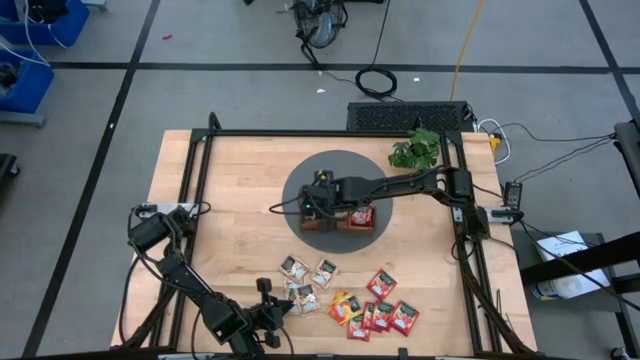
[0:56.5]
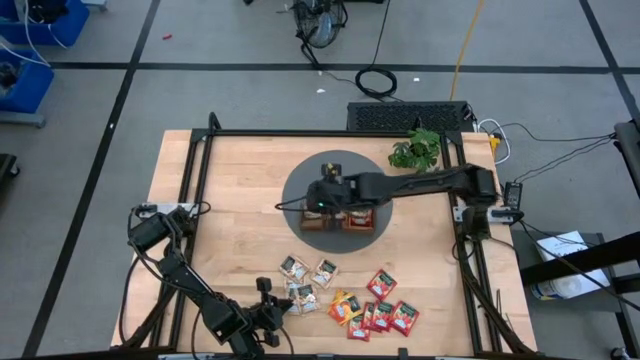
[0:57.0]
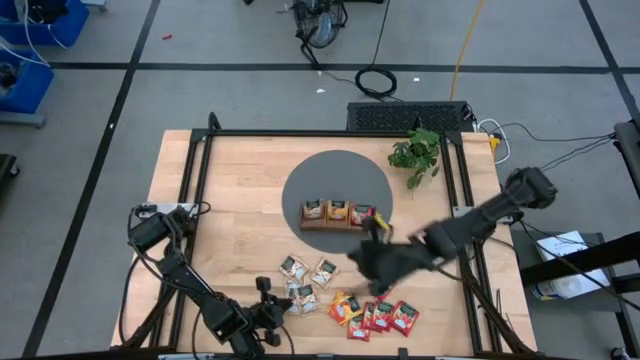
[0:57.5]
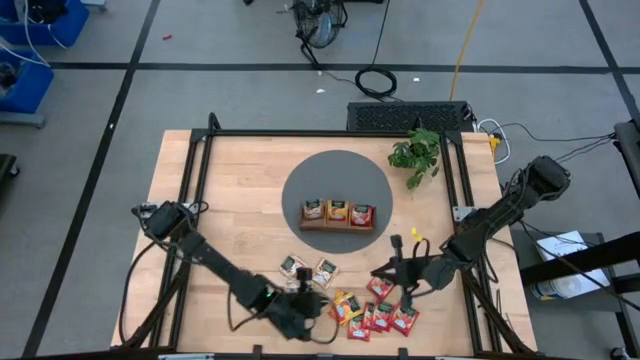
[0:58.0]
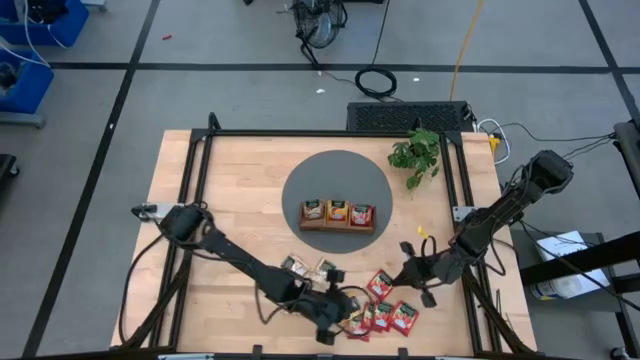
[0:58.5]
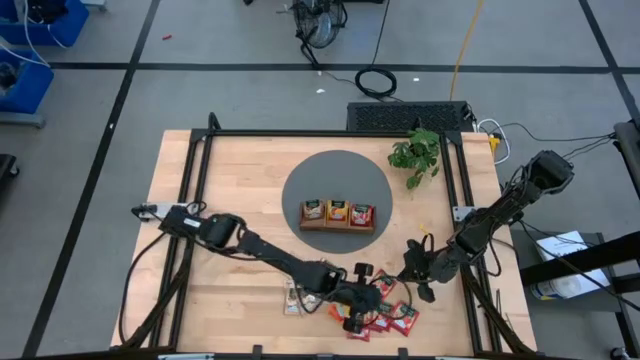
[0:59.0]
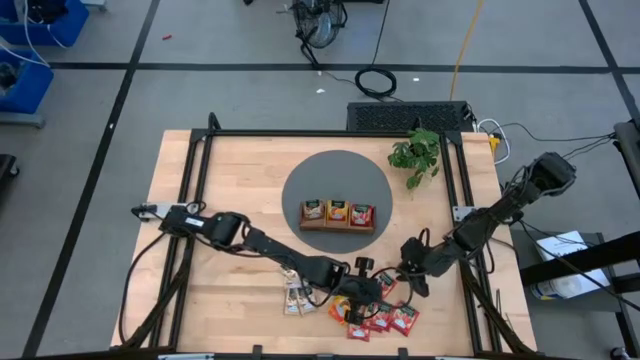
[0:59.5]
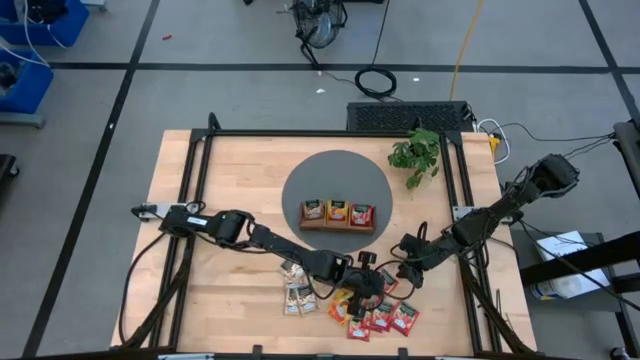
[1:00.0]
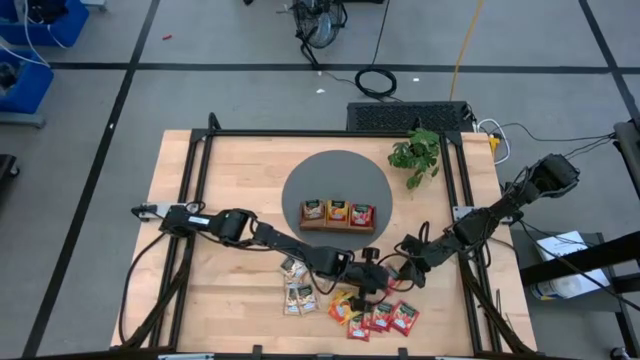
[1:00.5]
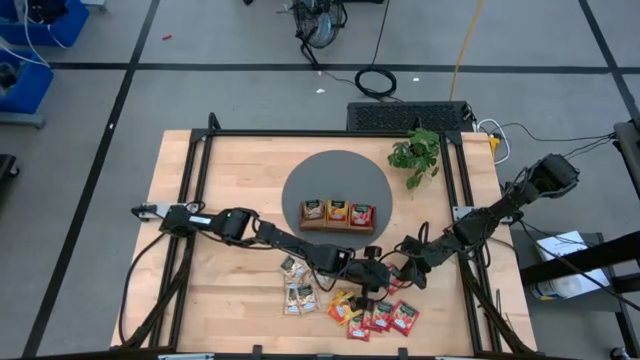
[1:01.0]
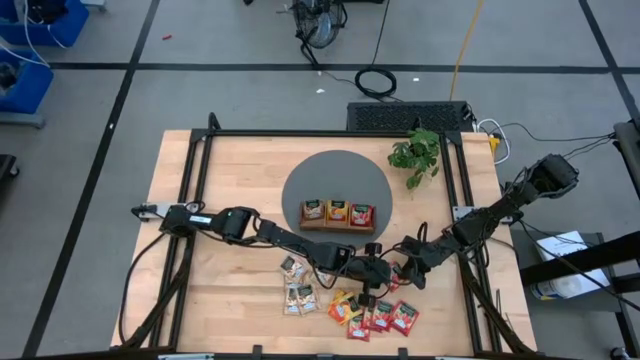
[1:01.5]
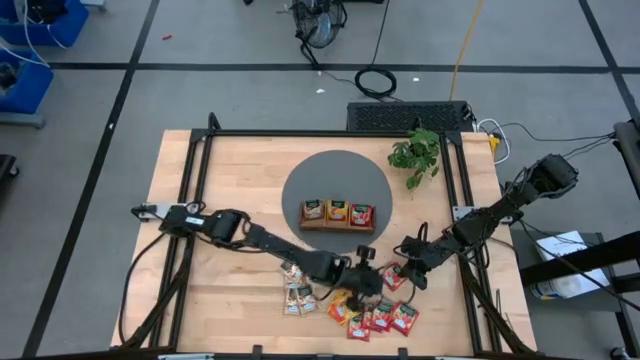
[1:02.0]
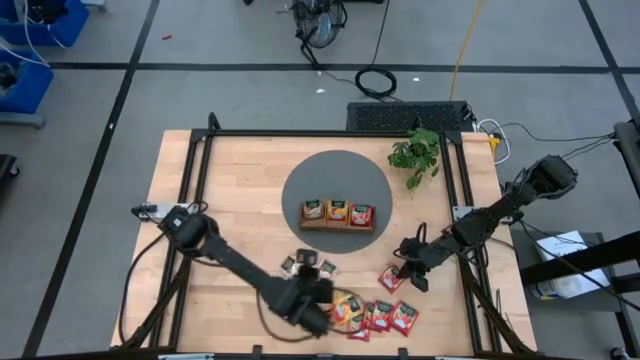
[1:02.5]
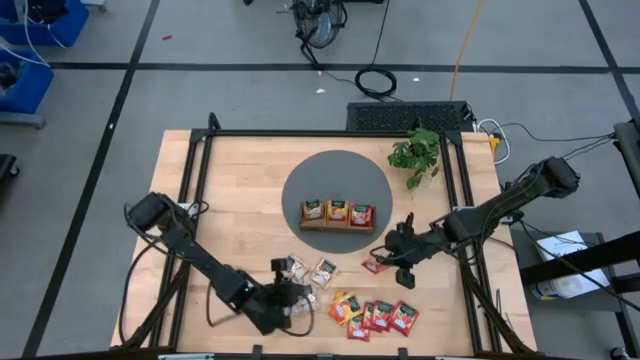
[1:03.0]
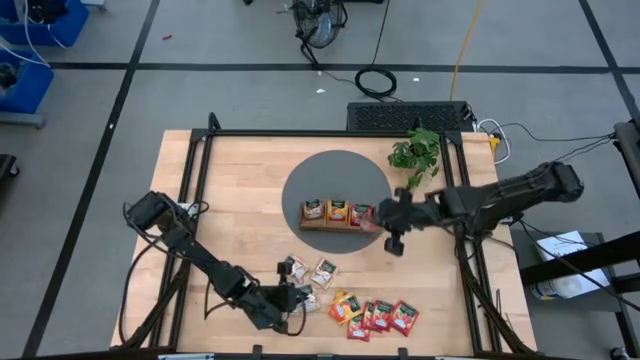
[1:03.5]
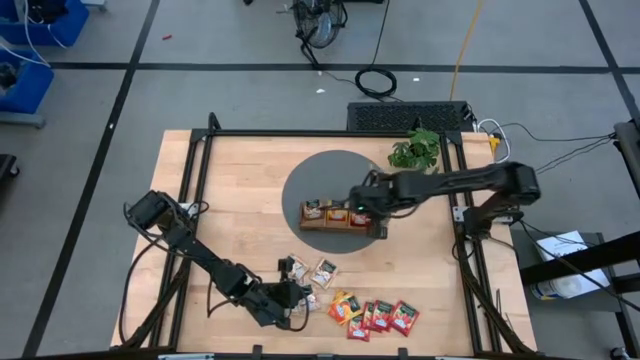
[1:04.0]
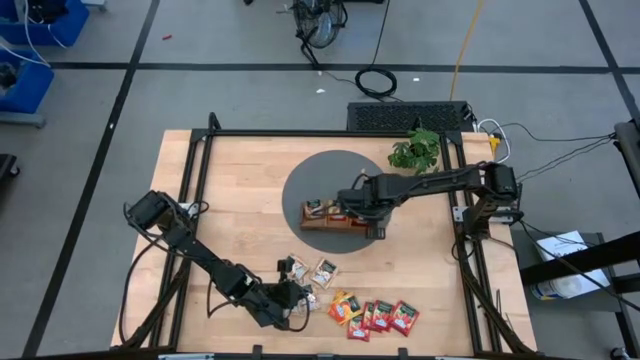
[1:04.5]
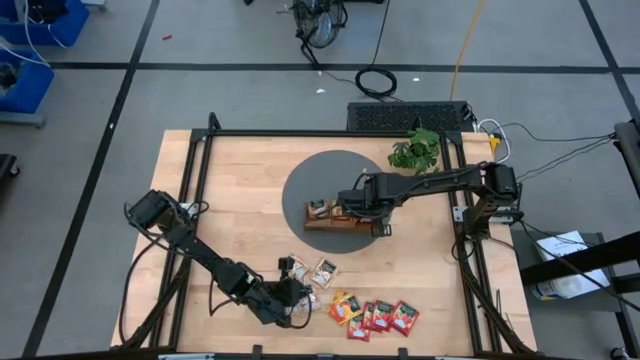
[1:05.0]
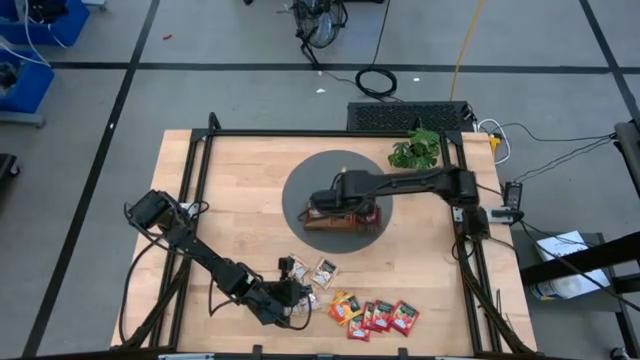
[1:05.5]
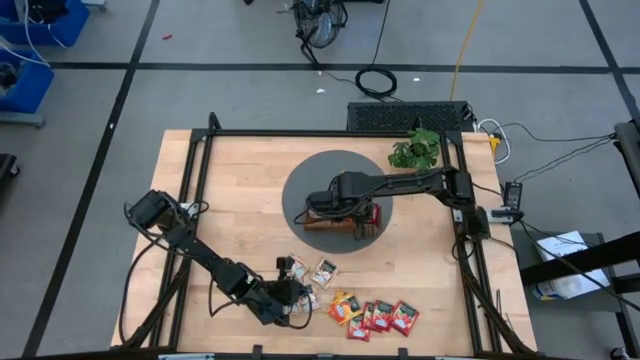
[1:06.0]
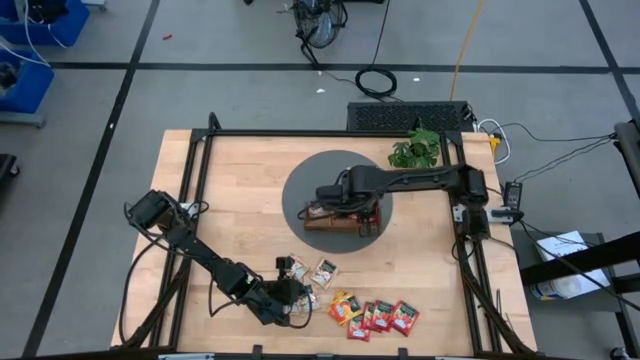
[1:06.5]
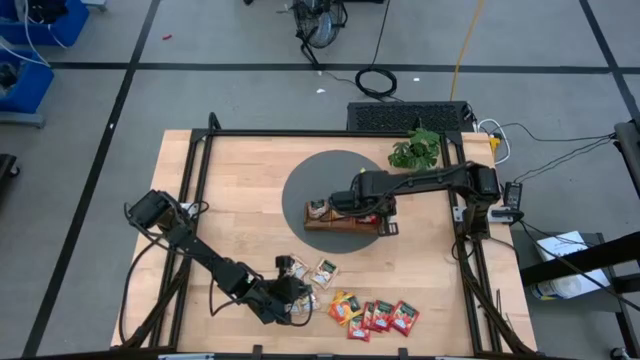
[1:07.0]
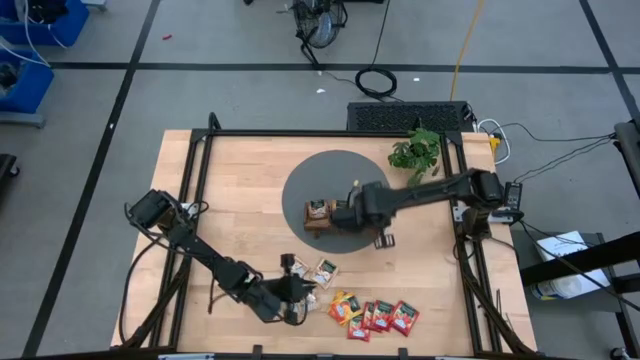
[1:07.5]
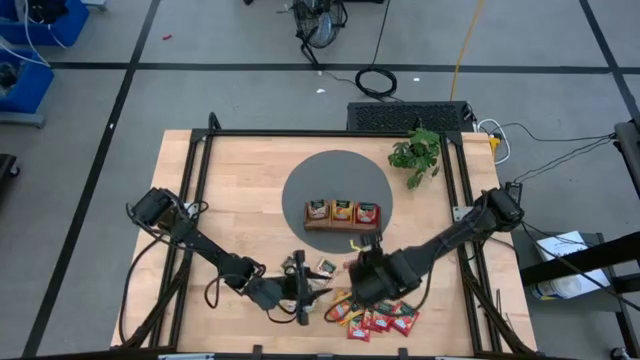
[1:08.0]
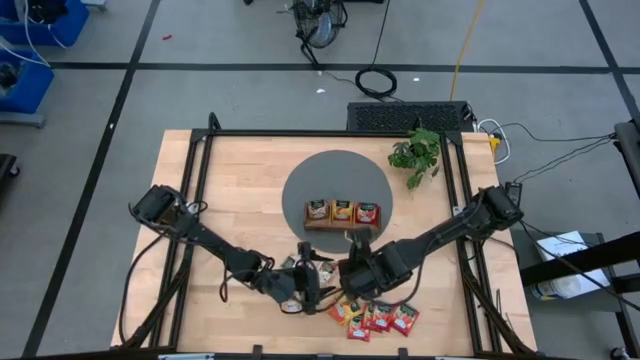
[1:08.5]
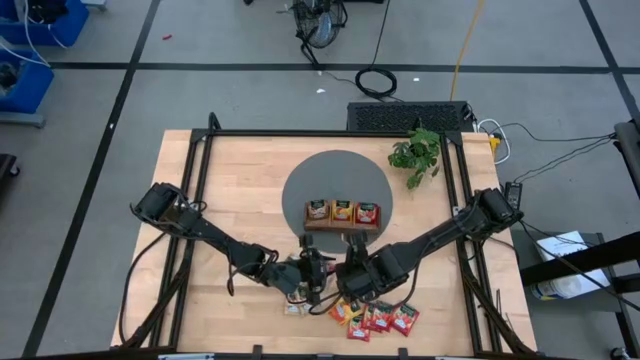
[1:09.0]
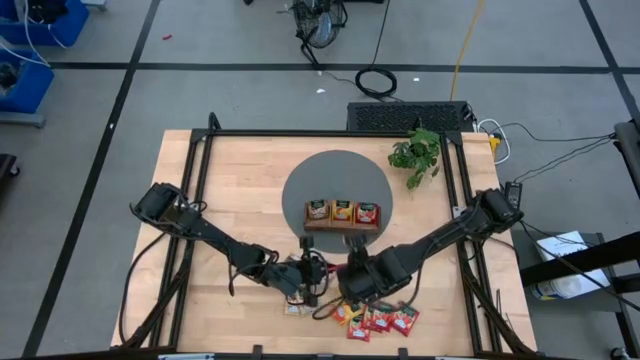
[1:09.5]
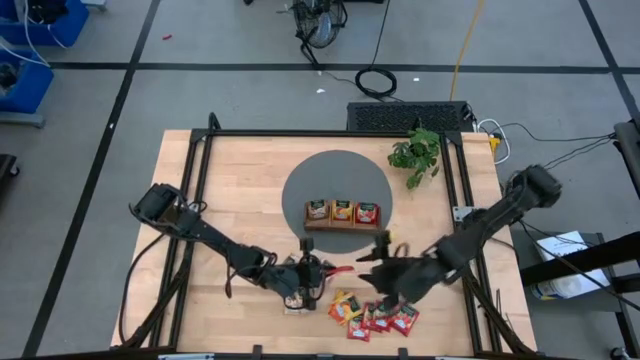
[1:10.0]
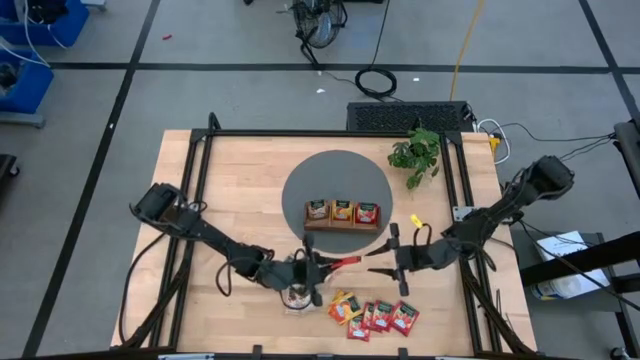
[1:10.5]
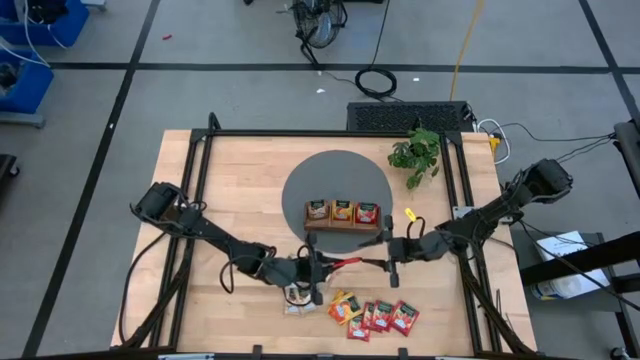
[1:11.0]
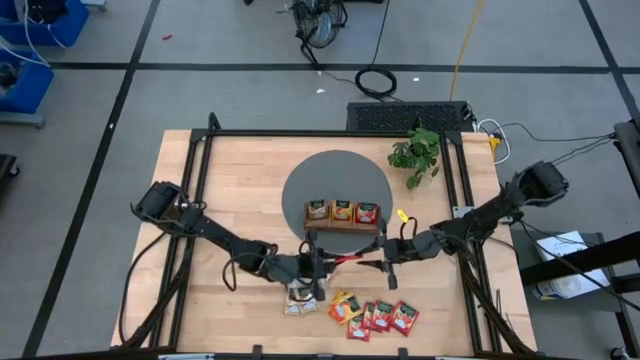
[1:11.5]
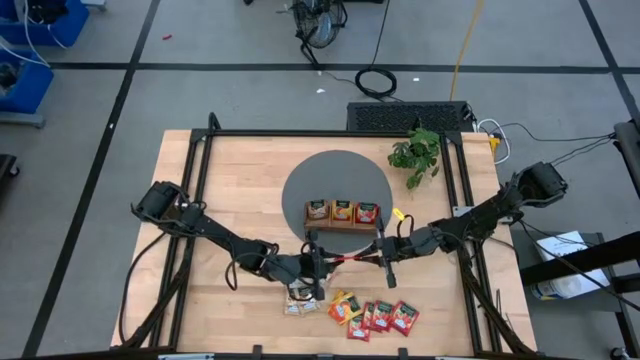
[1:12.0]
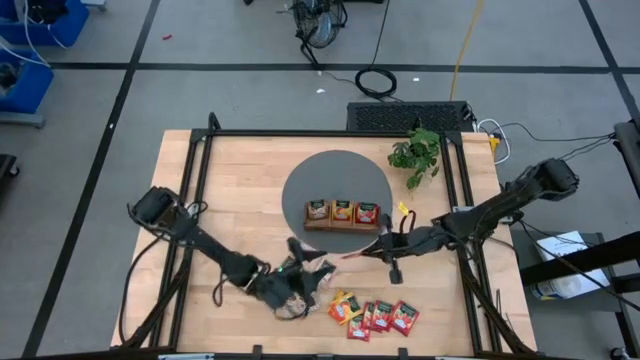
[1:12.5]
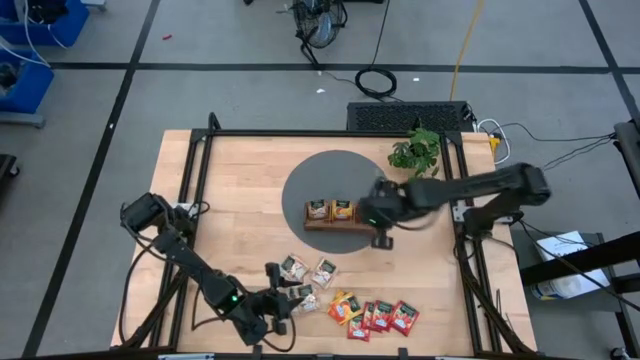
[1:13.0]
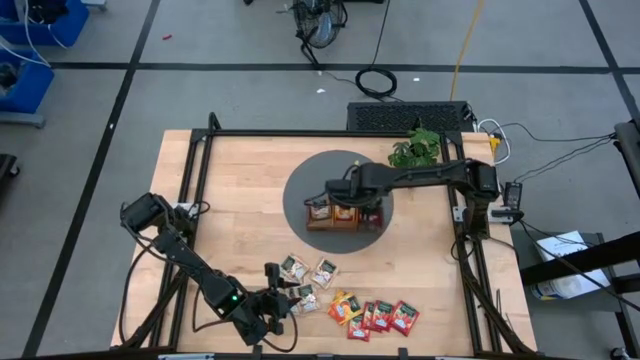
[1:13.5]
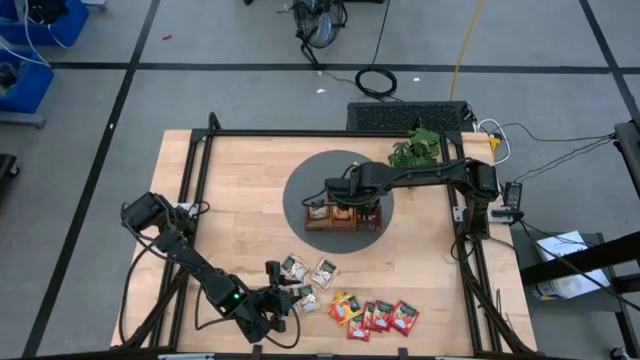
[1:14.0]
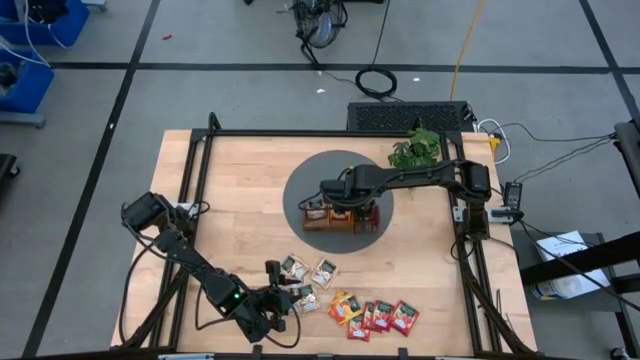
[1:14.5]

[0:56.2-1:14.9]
Task: Pick & Place Tea
Put the red tea bag into the right slot of the wooden organizer

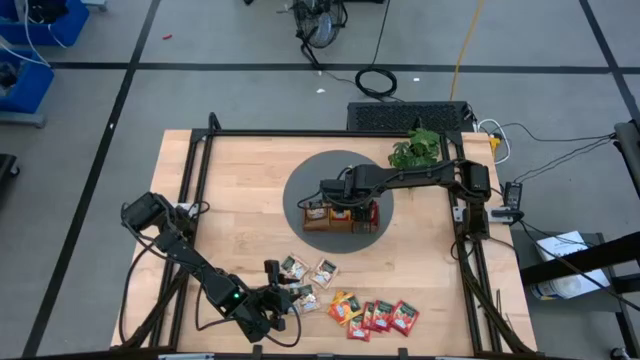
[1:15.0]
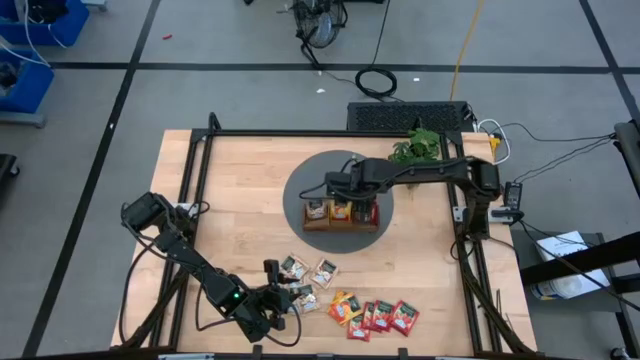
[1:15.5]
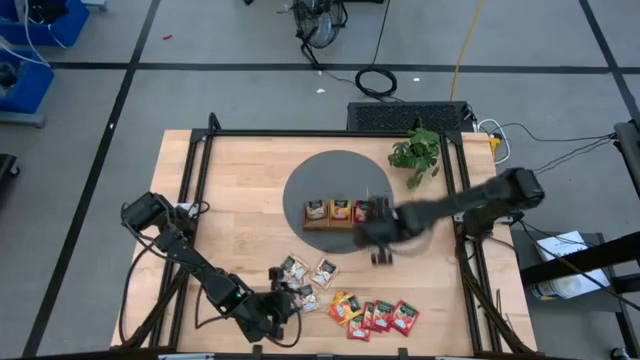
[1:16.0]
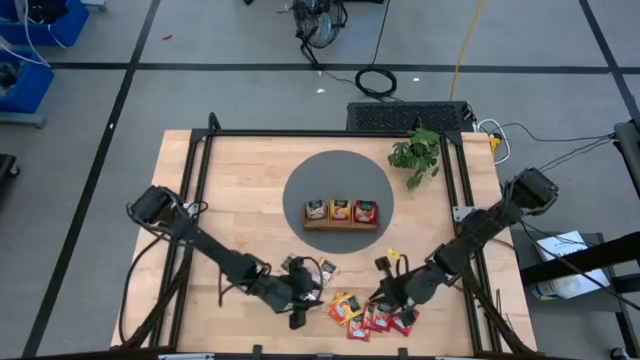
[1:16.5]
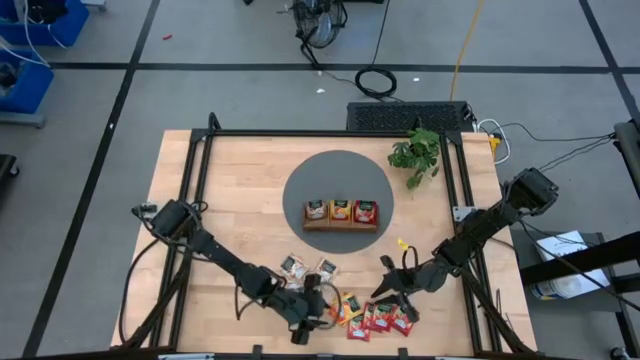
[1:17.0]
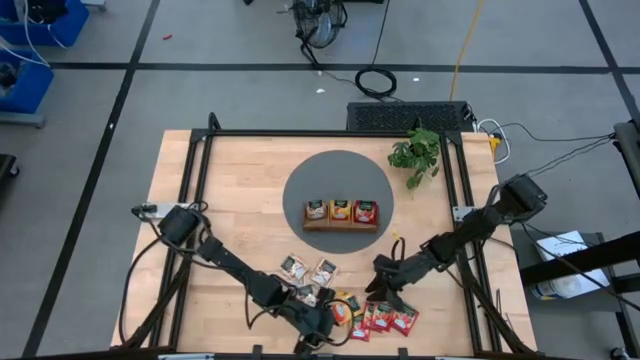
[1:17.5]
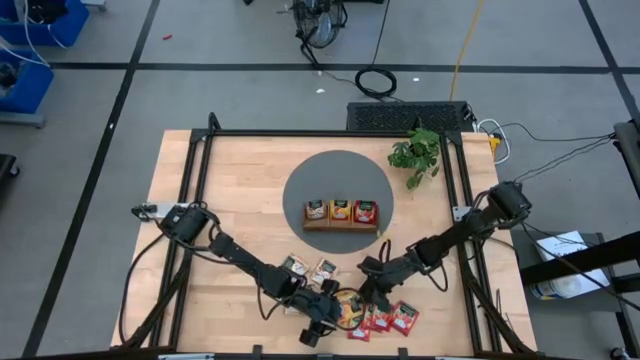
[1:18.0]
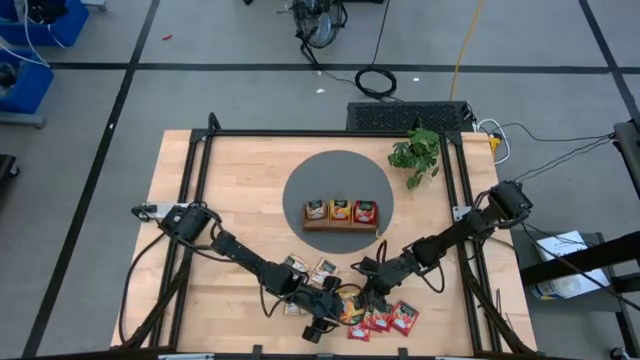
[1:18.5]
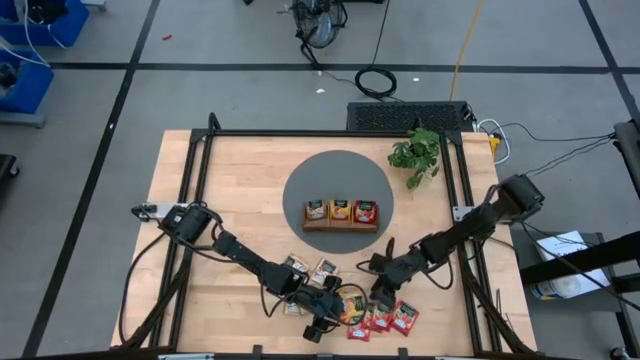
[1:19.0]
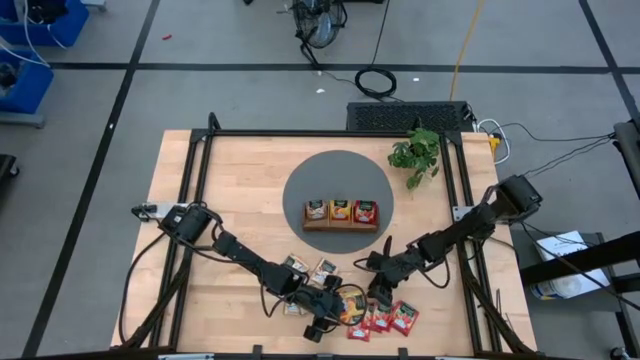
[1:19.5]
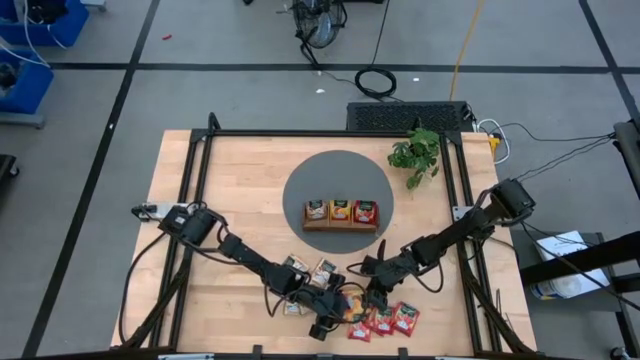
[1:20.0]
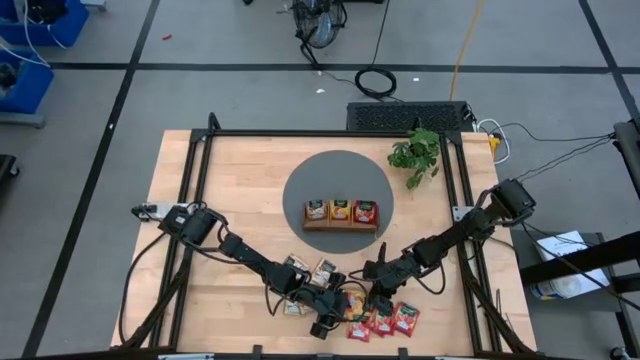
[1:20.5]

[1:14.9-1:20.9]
Put the top orange tea bag into the middle slot of the wooden organizer
